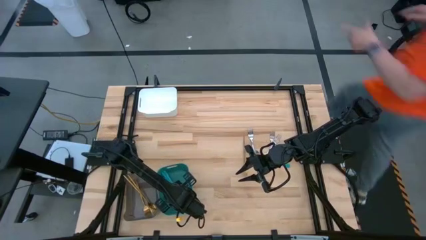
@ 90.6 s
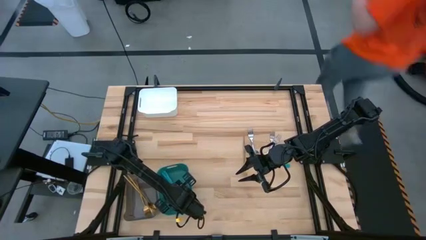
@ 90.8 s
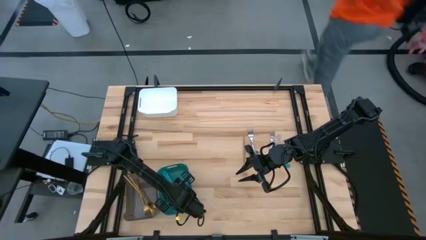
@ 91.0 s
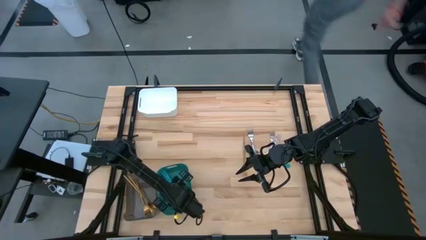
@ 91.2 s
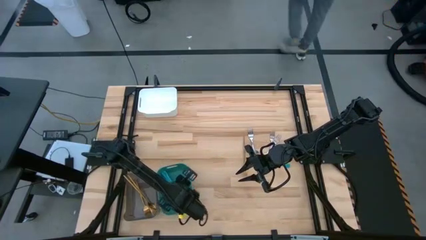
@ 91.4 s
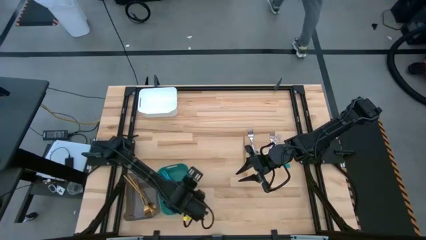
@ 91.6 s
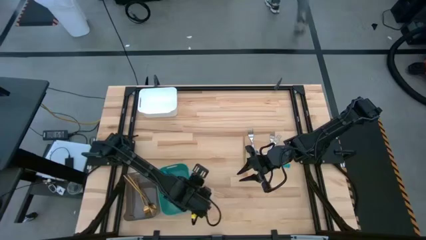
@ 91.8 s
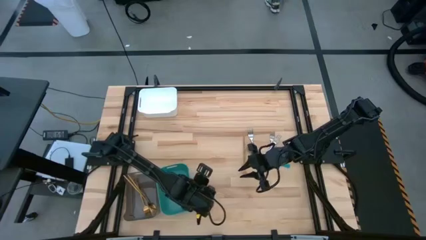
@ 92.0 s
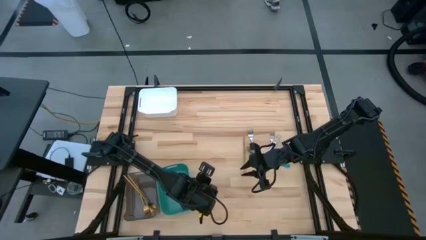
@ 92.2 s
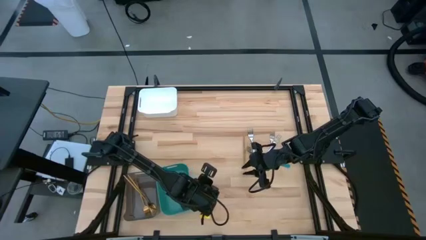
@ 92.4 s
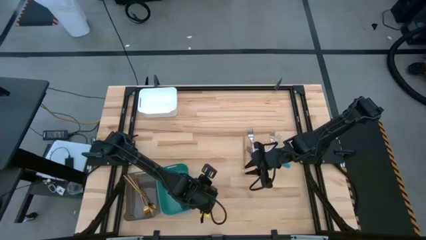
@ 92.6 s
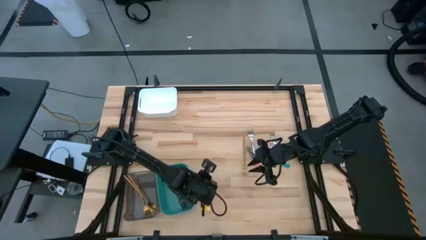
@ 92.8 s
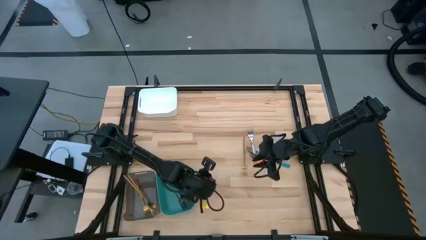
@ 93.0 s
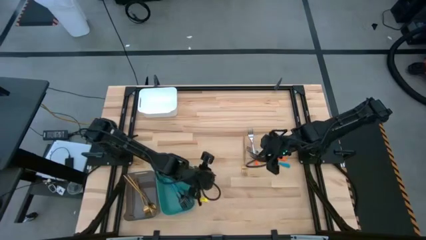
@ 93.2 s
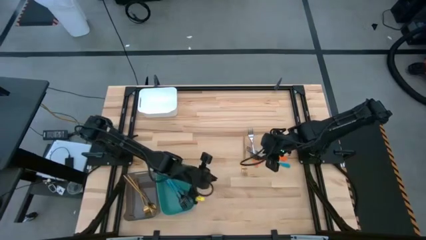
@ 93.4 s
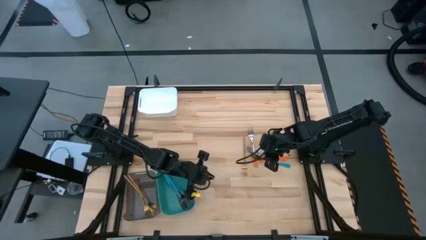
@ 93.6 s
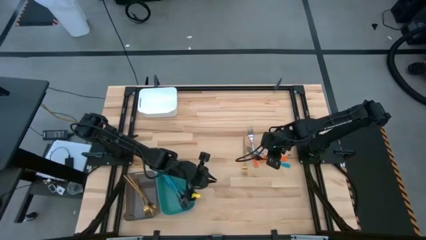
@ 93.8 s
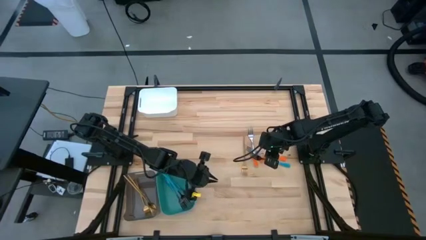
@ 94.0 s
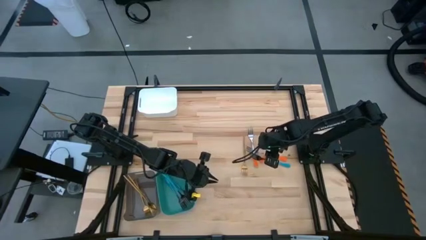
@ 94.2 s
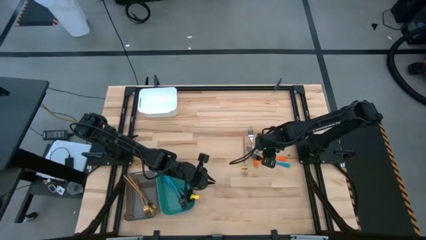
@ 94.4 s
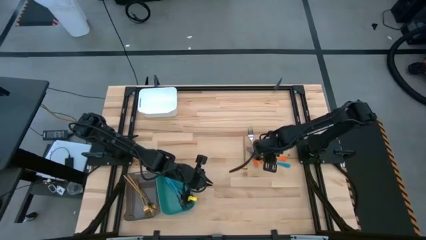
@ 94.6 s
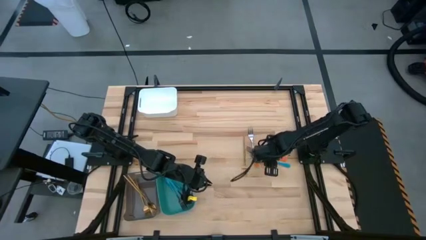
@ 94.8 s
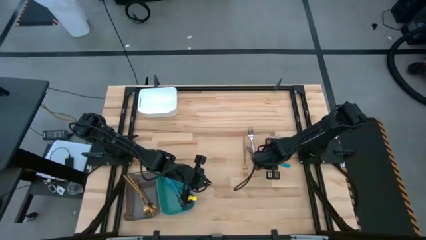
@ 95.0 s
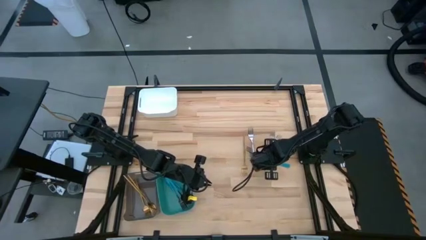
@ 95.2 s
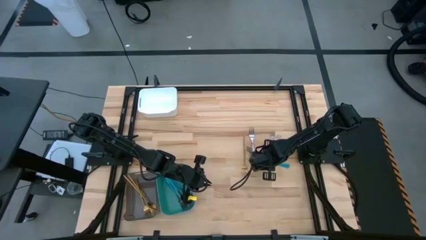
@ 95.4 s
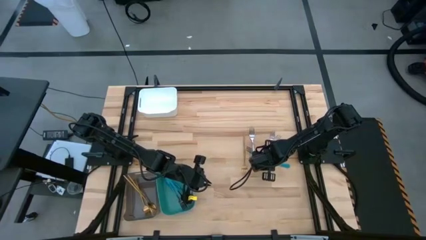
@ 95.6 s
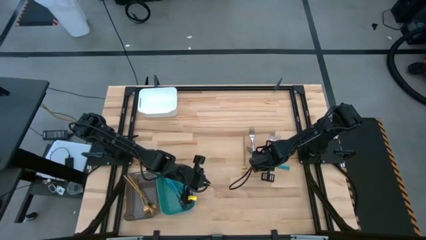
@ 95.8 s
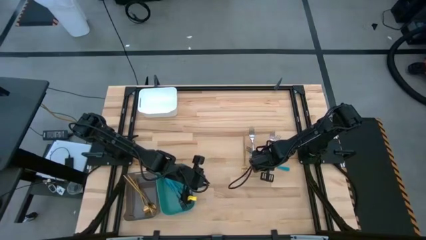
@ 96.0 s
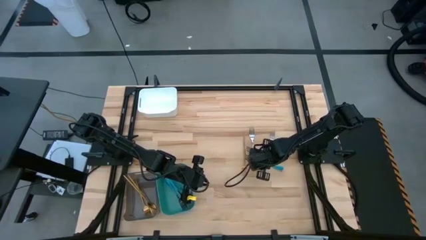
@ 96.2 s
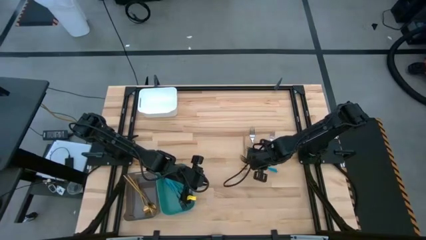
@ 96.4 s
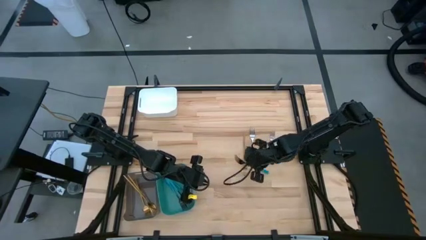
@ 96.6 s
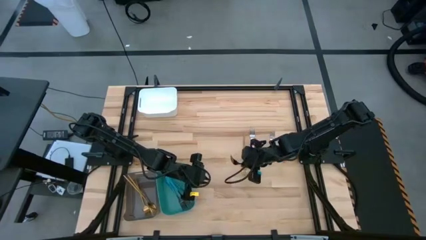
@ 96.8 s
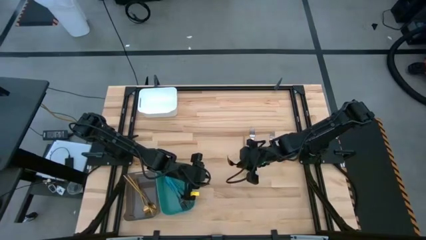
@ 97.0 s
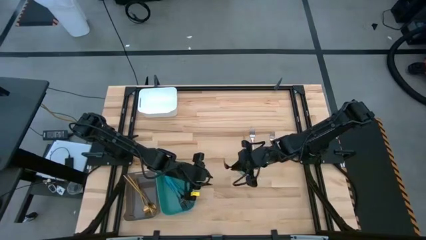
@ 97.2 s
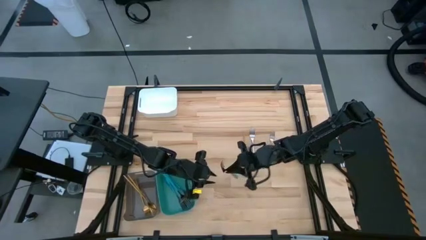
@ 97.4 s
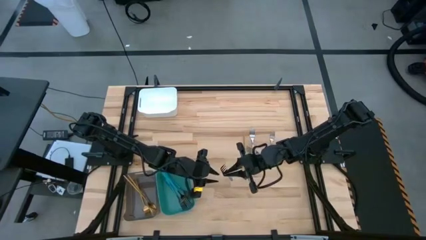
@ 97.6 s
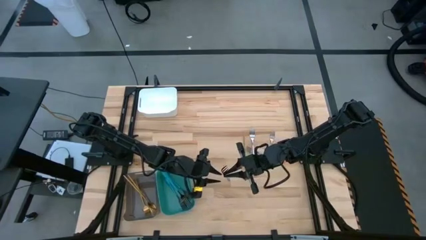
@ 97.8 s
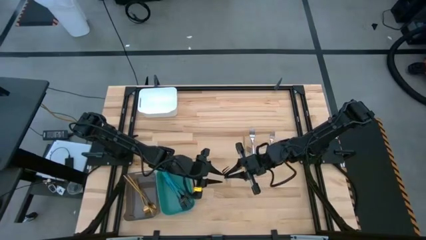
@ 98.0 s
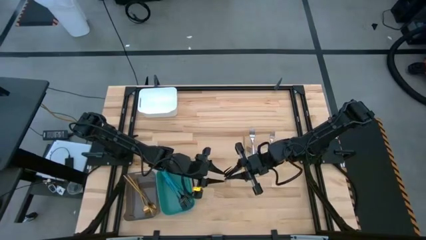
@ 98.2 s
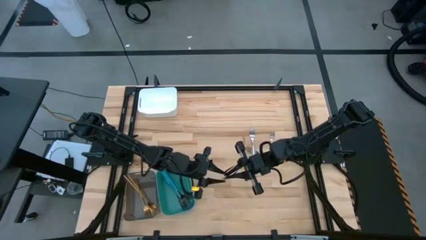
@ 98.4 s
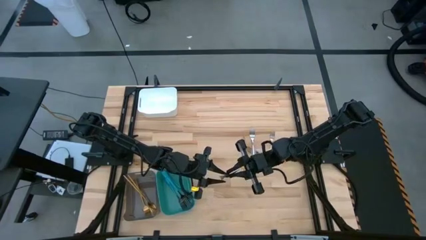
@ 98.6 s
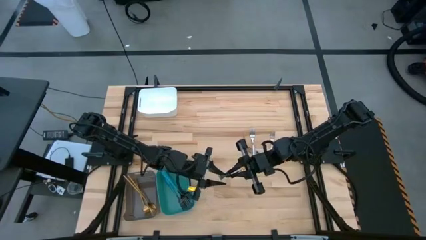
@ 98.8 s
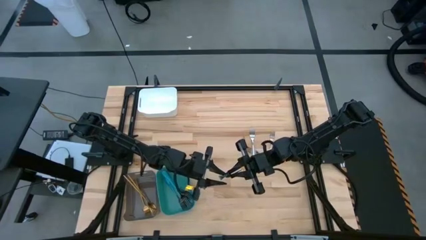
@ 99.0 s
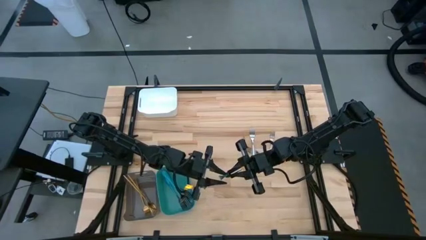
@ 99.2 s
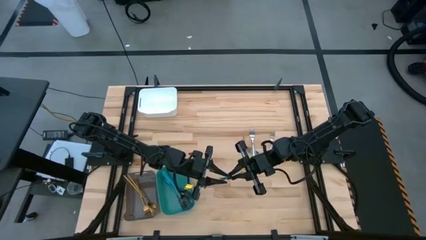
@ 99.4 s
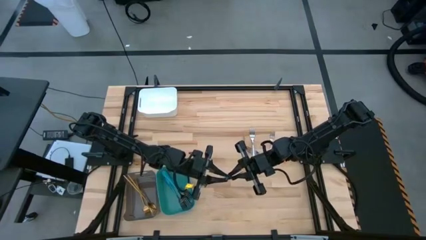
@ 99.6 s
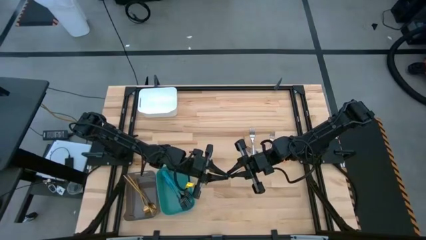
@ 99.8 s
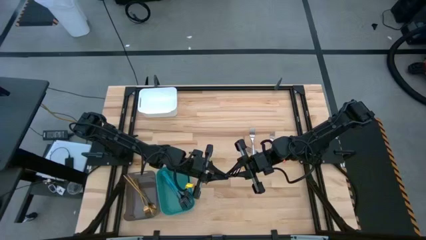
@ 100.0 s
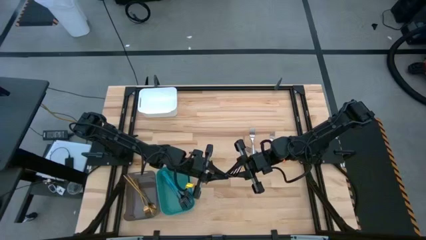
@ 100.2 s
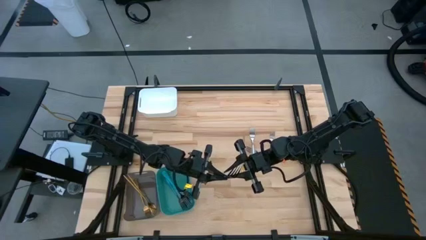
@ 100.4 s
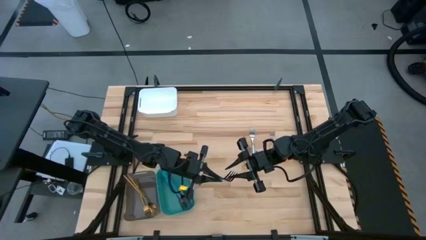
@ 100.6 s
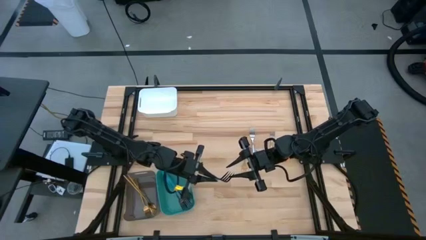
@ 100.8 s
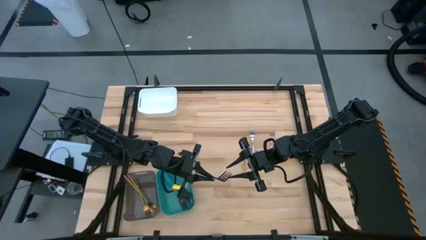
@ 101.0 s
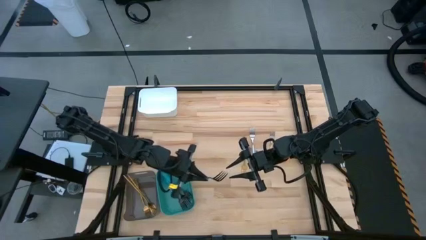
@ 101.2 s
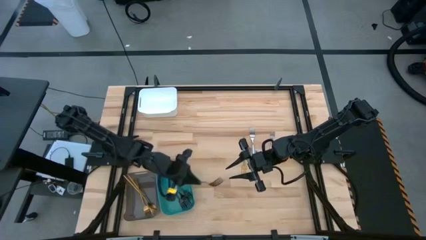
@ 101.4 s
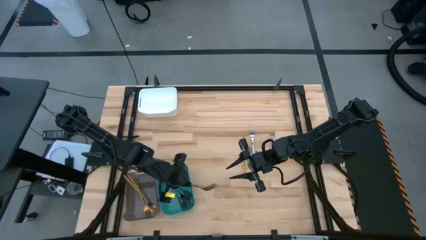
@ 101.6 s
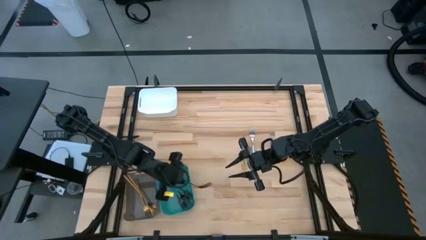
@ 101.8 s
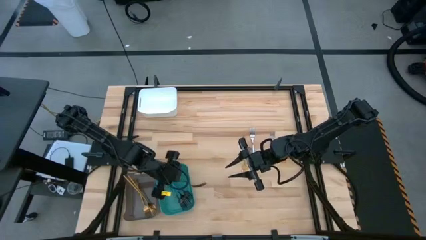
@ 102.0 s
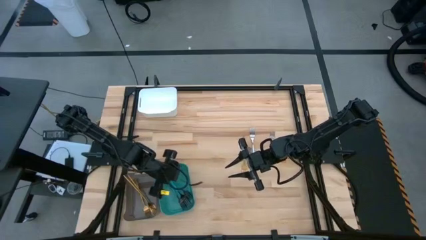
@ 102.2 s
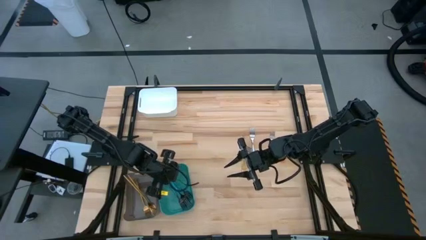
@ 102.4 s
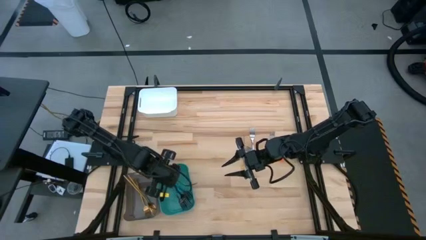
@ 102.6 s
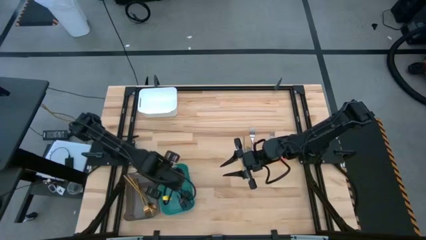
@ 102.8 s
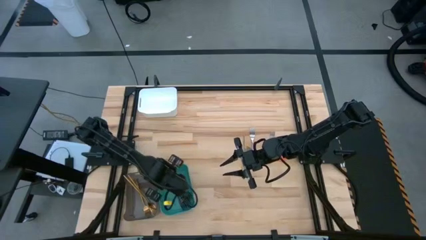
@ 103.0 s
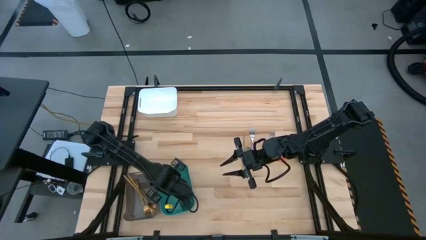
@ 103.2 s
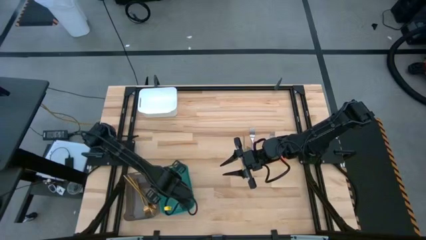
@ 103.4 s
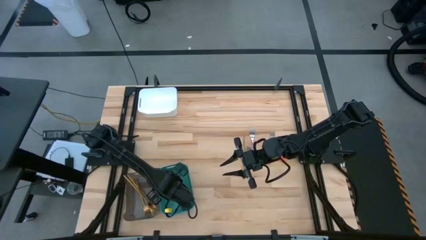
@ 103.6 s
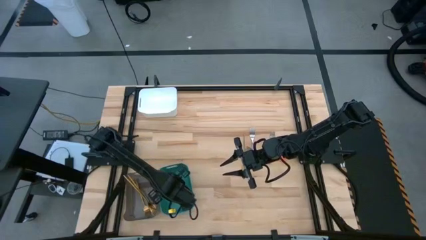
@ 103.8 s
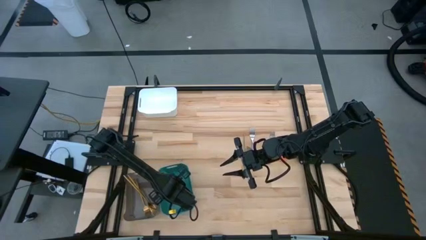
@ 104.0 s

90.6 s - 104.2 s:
Task: Sort silverware by color (type)
Put the blue fork into the green bin
